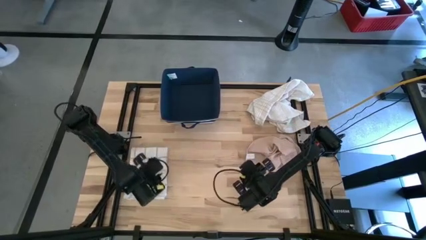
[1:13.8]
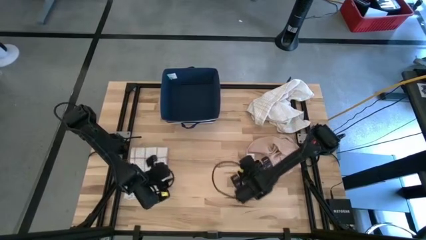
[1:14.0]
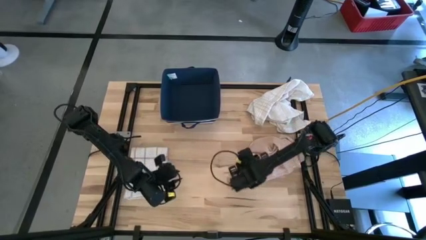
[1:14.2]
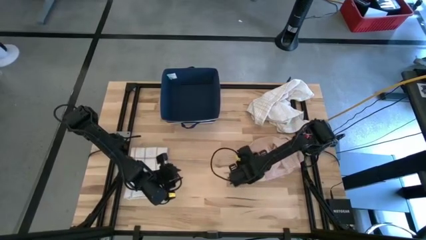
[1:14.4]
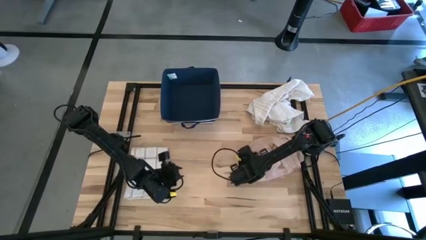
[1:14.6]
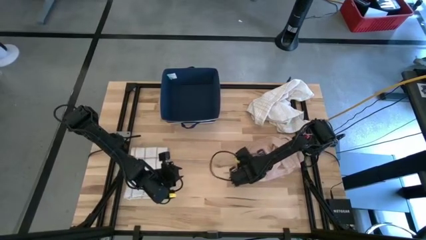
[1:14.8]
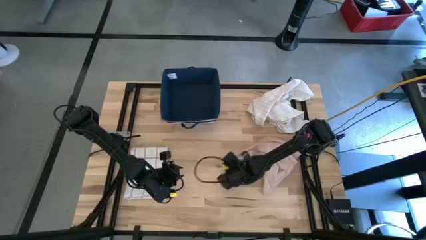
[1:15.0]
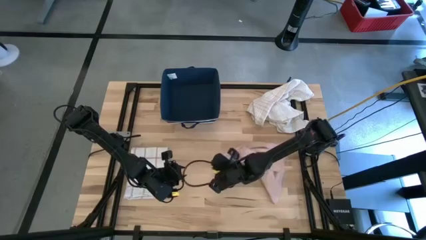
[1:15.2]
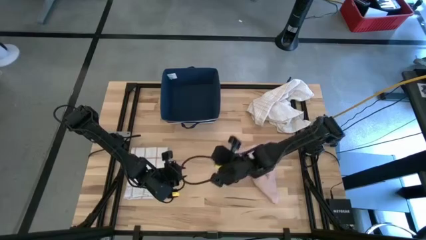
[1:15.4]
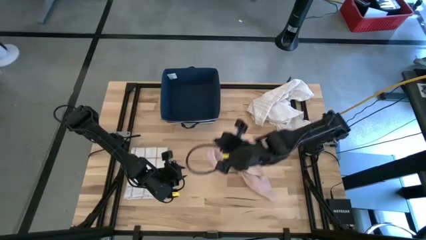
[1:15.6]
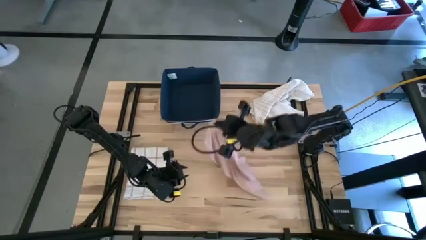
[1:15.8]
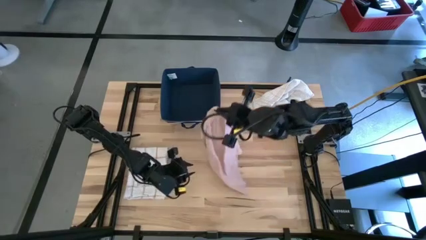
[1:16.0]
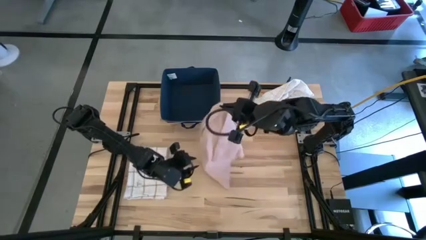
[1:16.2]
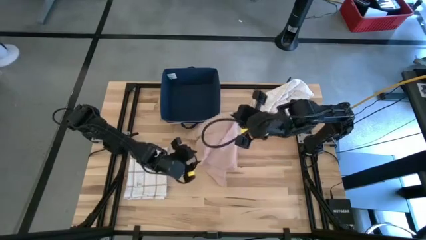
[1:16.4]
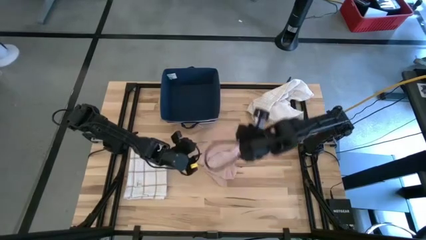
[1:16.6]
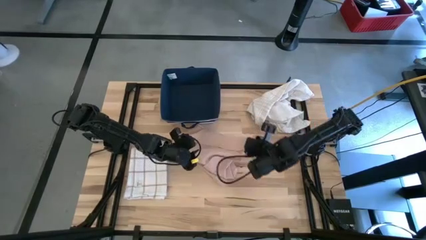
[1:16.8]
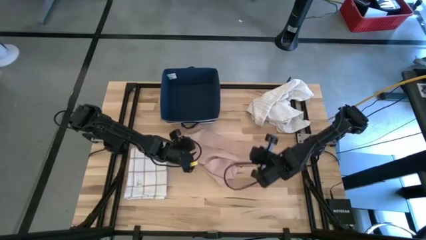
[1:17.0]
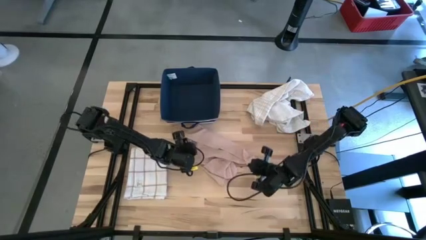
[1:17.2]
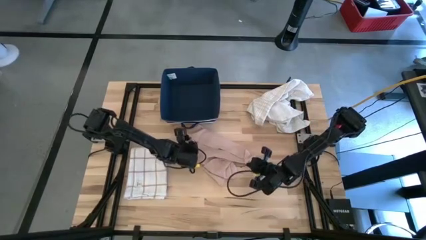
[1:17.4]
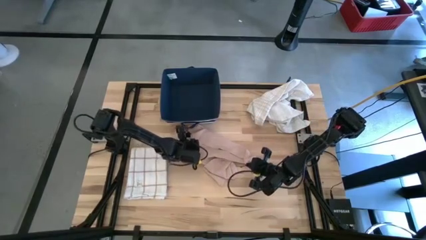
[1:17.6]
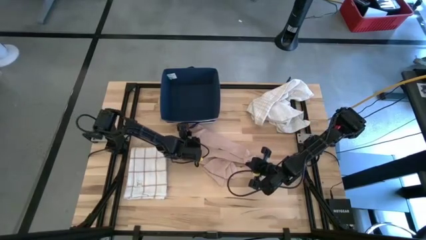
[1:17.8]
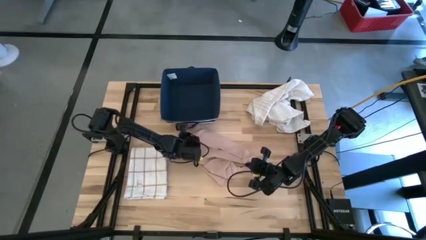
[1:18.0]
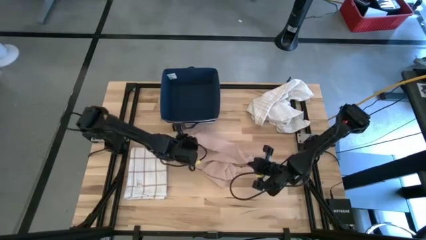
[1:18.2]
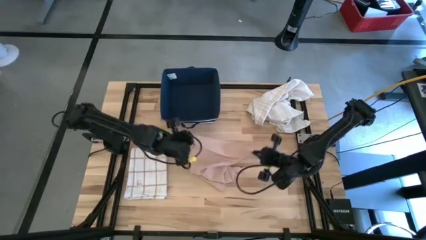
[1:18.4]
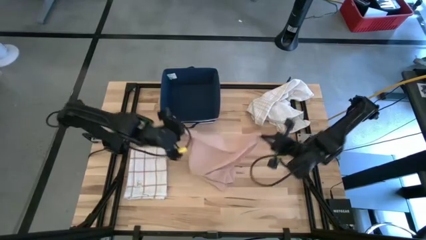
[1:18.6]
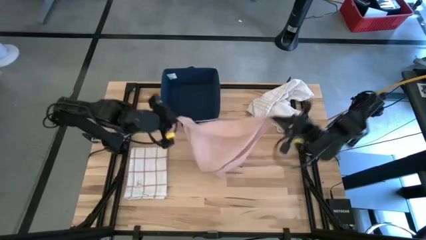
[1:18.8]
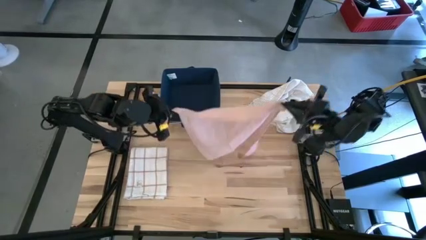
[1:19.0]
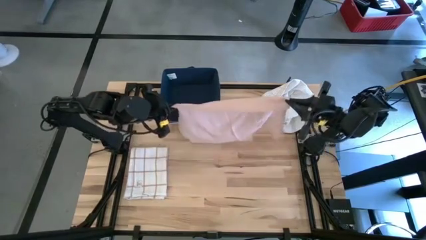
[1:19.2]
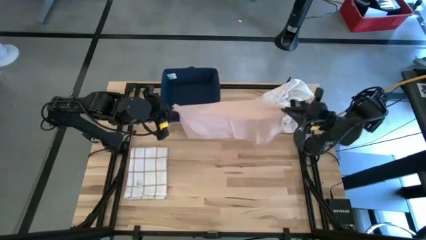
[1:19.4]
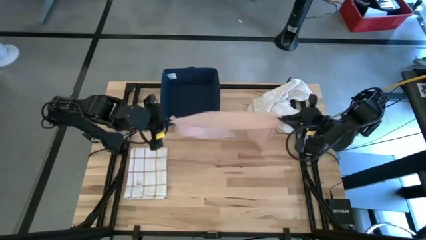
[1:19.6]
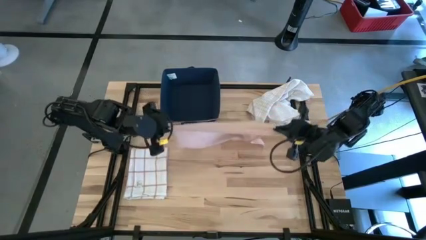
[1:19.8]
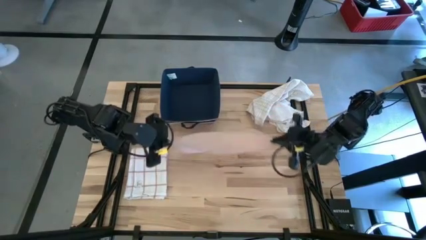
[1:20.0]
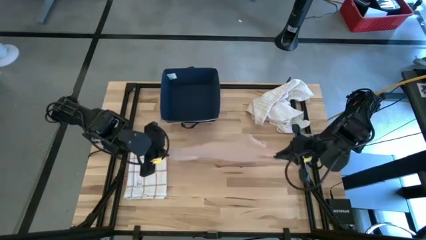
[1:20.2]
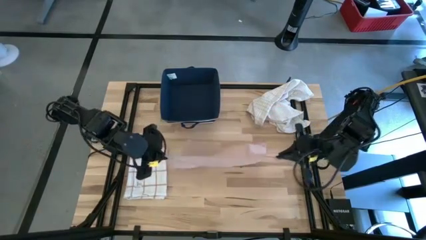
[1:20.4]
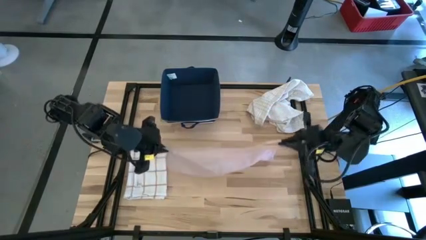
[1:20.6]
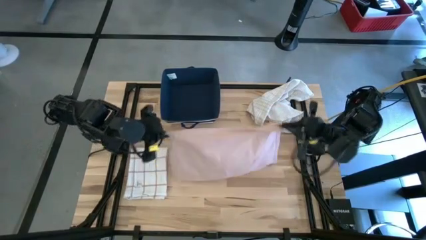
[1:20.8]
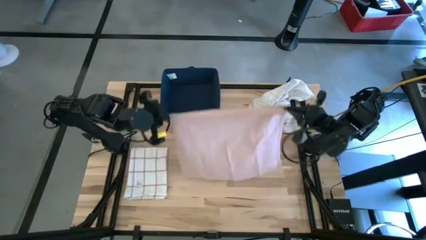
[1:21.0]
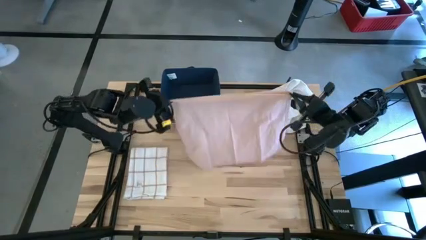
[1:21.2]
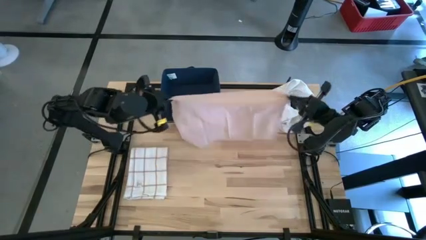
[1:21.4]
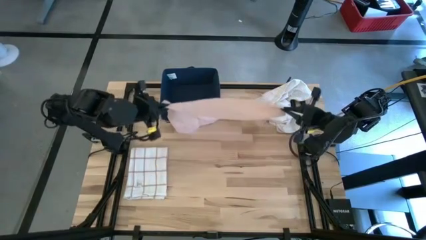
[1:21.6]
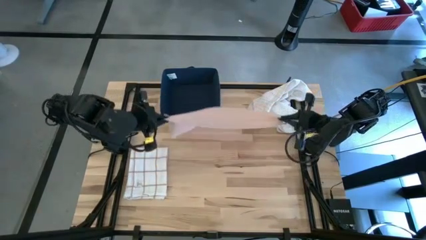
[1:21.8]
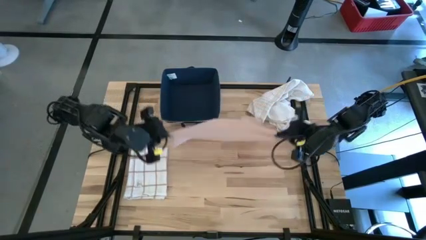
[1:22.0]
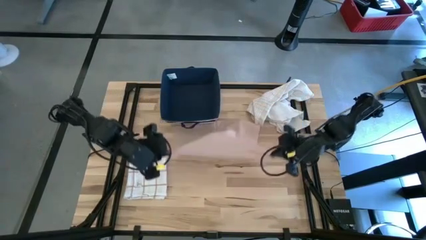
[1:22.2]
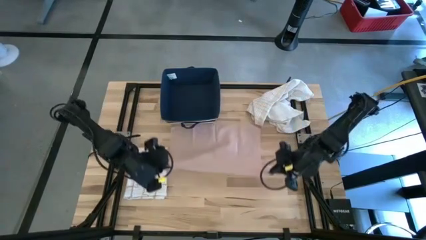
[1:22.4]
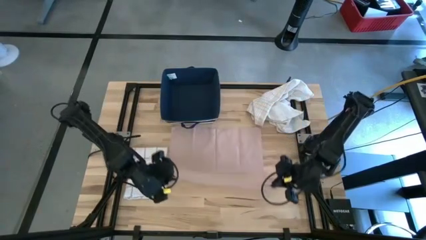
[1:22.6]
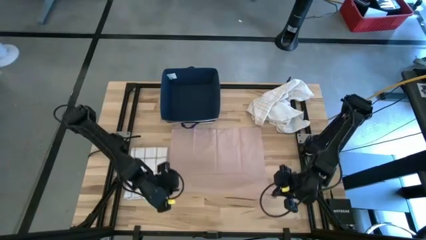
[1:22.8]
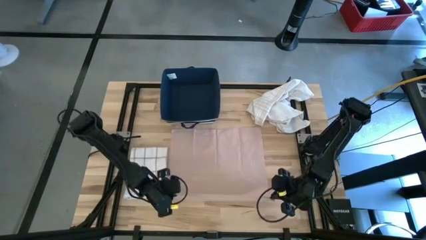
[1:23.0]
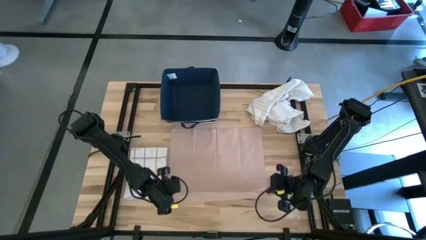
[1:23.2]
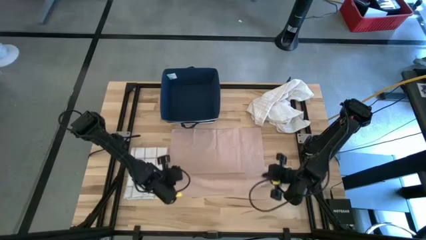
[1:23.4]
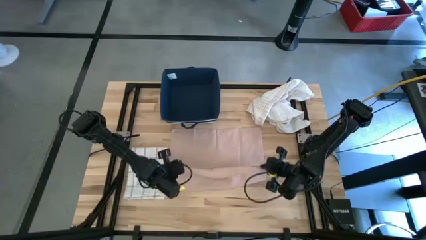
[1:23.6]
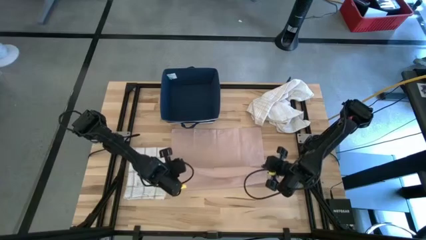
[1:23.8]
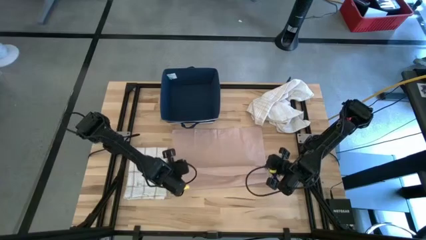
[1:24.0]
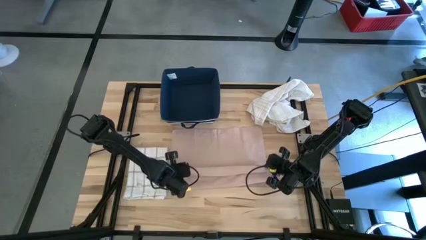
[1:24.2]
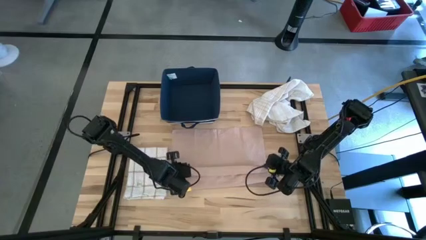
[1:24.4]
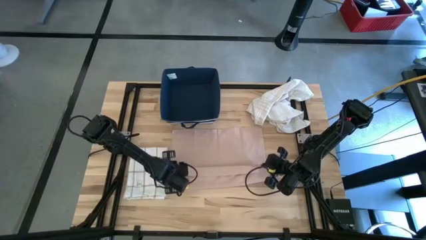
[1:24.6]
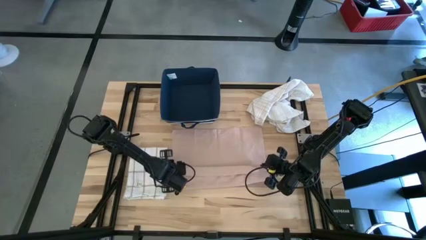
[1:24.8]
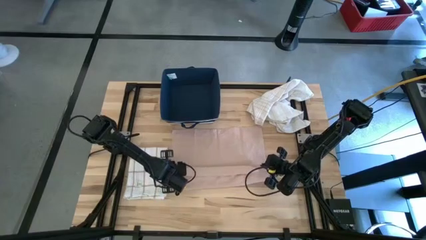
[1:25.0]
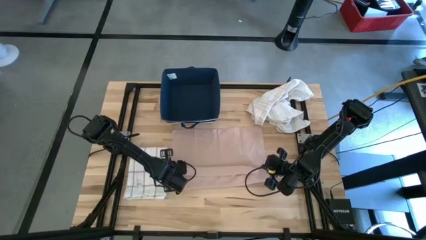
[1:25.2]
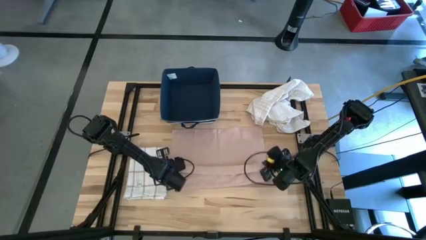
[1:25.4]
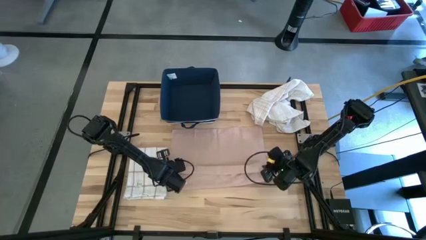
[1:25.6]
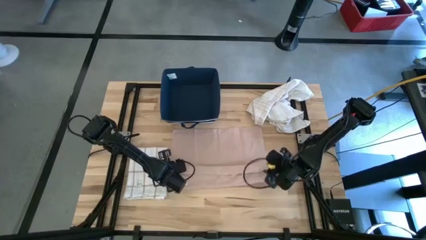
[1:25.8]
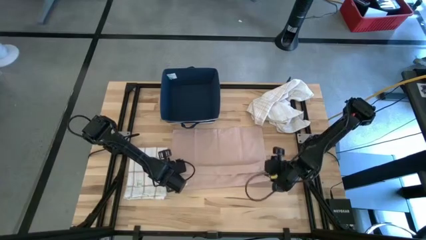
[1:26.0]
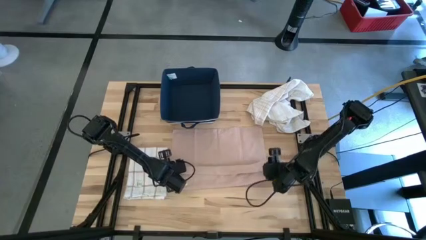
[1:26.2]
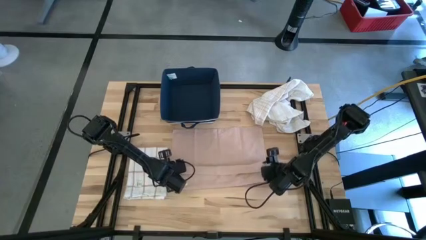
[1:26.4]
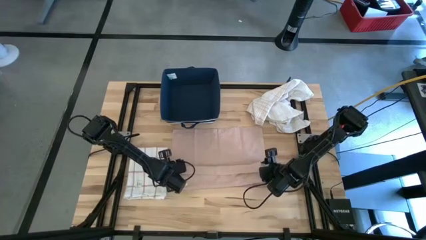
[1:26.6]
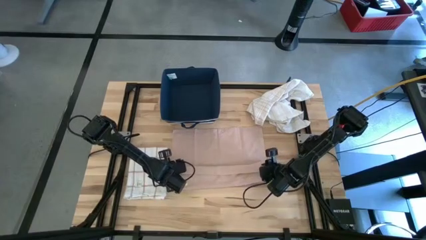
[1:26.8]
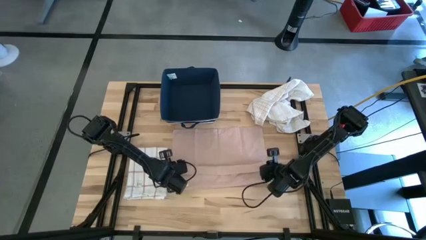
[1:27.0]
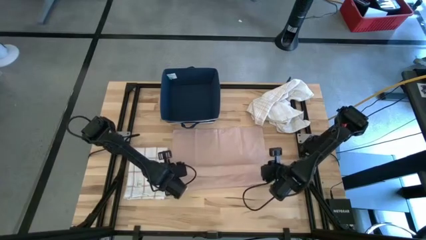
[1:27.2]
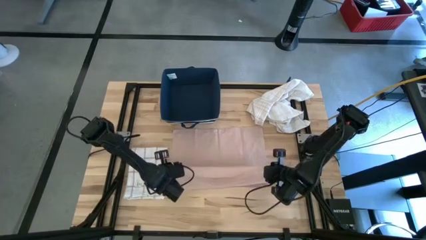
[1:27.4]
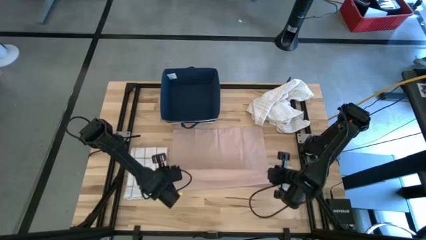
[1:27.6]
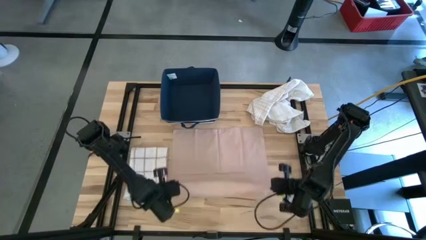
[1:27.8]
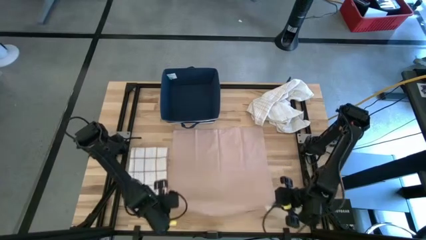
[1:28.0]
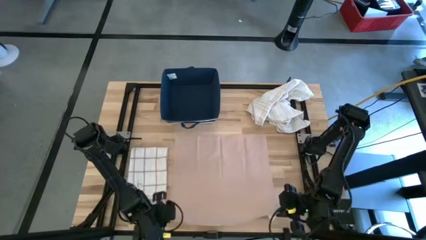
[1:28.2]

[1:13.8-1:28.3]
Task: Fold towel
Fold the light brown towel
